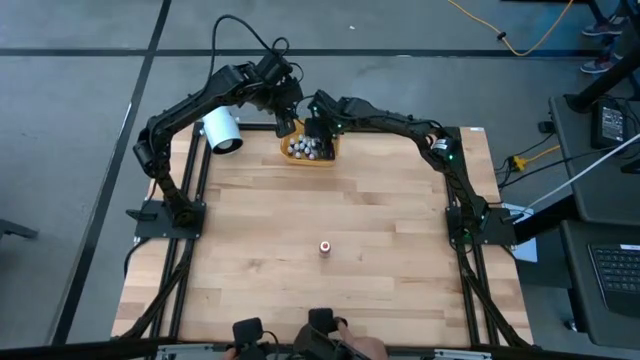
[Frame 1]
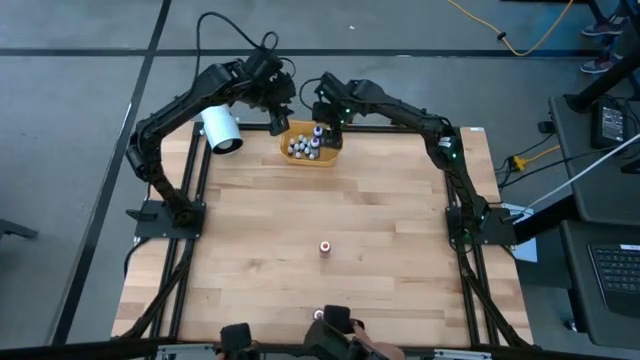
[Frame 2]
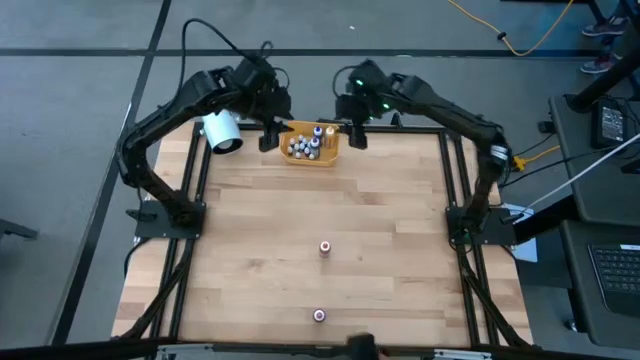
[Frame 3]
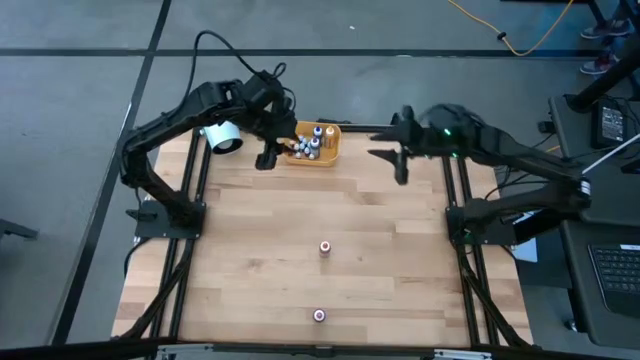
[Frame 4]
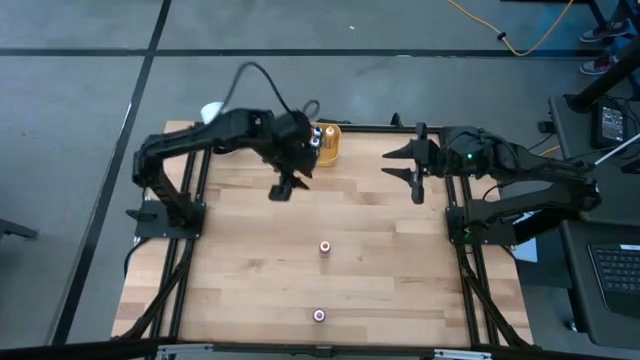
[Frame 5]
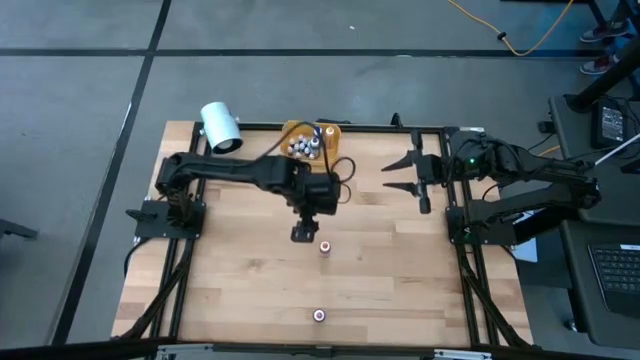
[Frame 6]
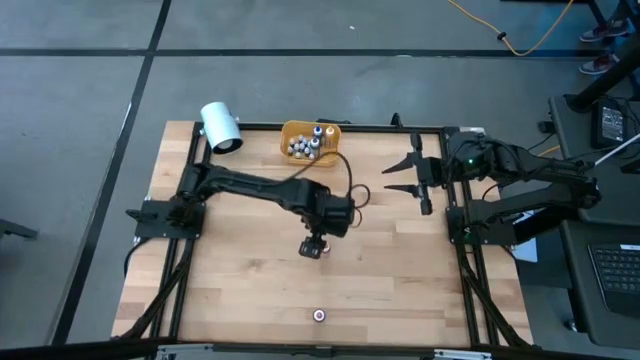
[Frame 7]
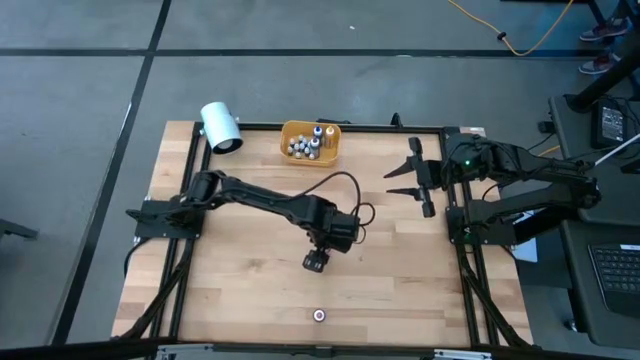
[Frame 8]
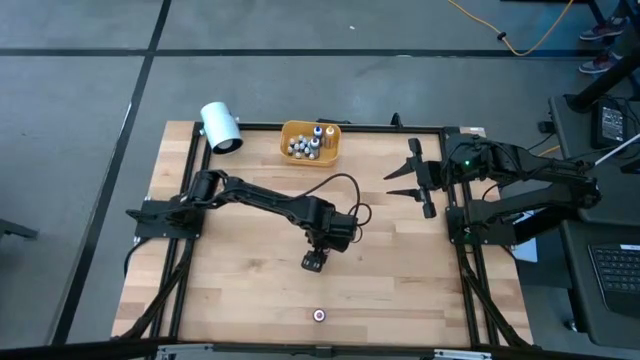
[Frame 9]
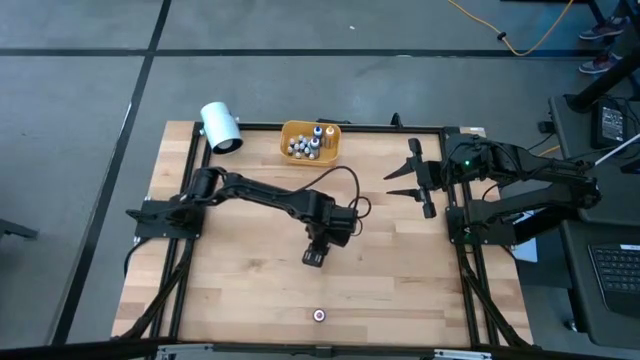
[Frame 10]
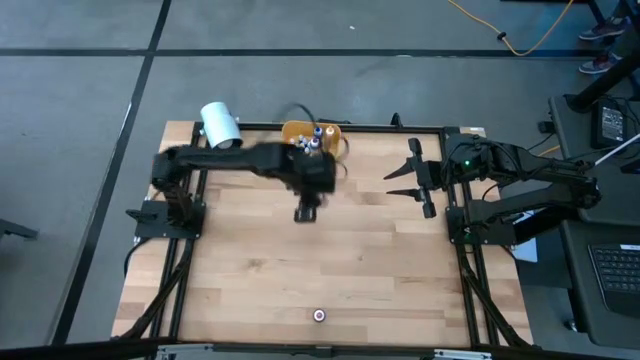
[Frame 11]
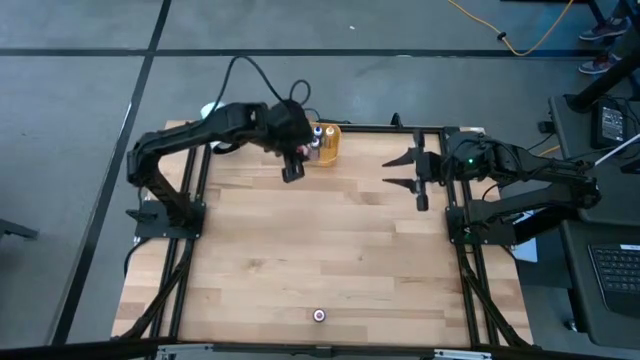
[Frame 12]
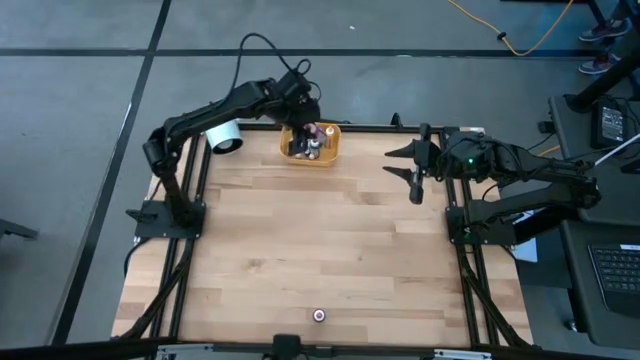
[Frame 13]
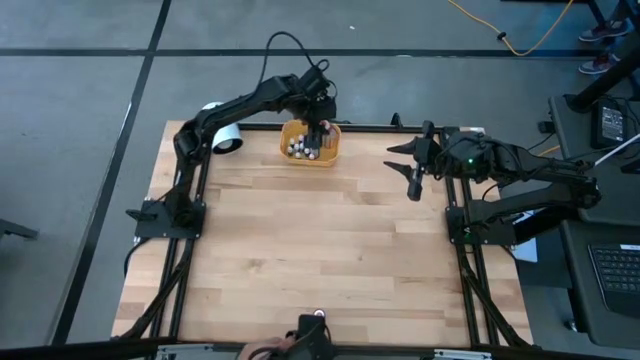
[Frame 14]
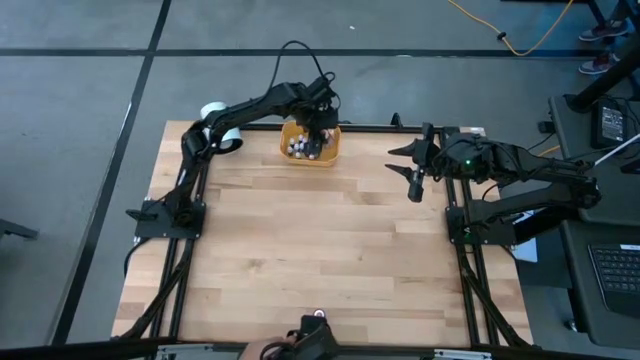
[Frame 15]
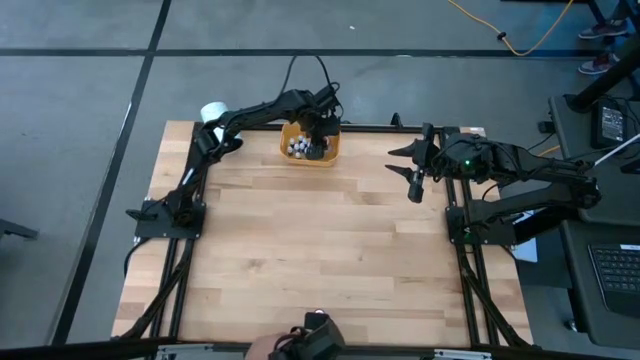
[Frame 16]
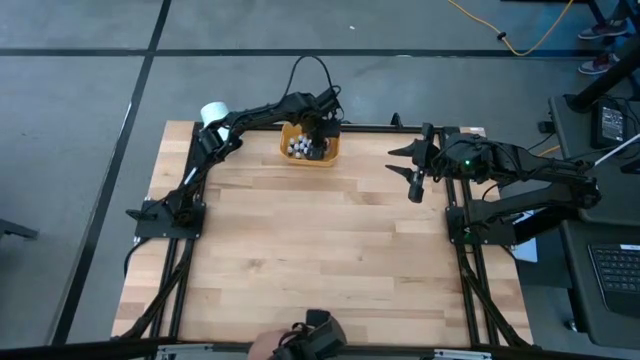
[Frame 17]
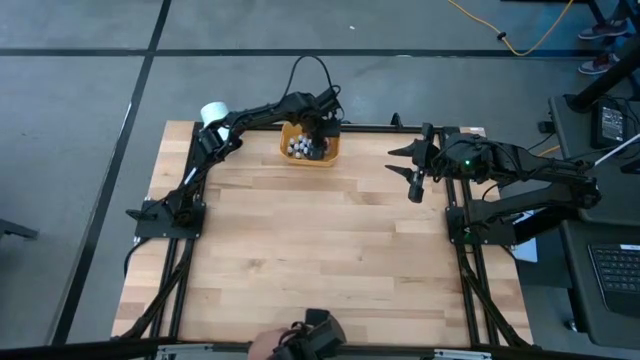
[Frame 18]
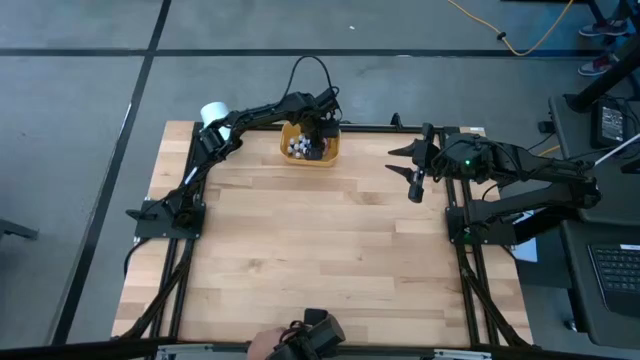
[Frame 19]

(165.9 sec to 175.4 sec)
Task: Pick & Place food coloring
Put the large orange food coloring bottle into the yellow bin

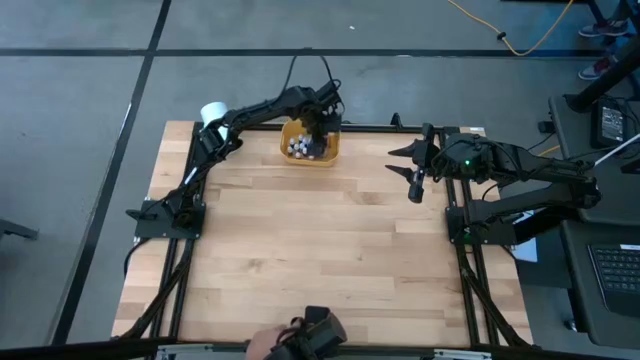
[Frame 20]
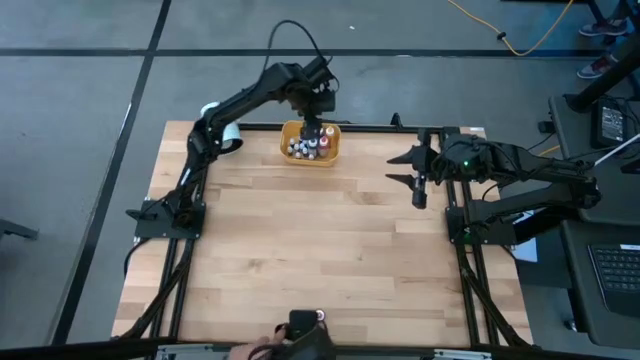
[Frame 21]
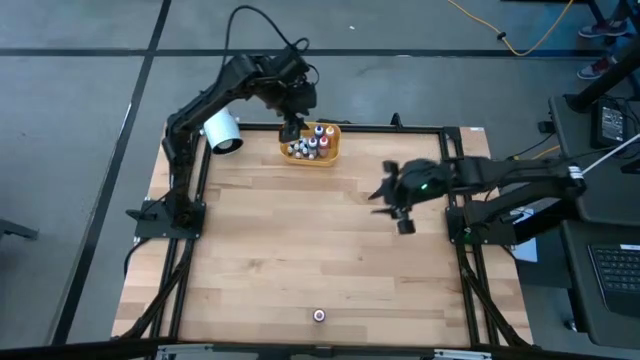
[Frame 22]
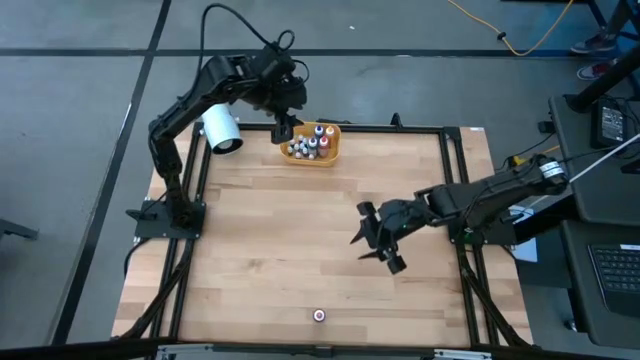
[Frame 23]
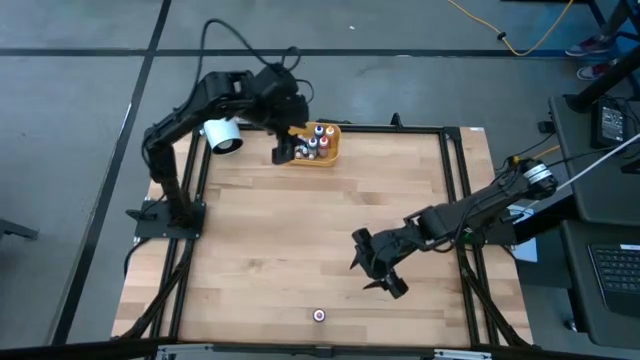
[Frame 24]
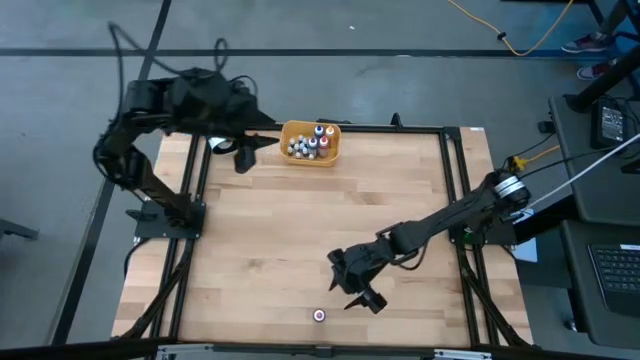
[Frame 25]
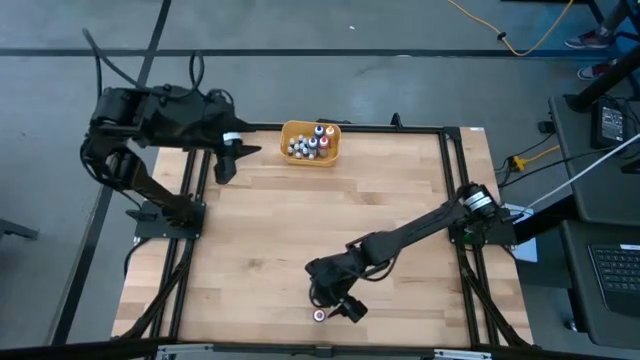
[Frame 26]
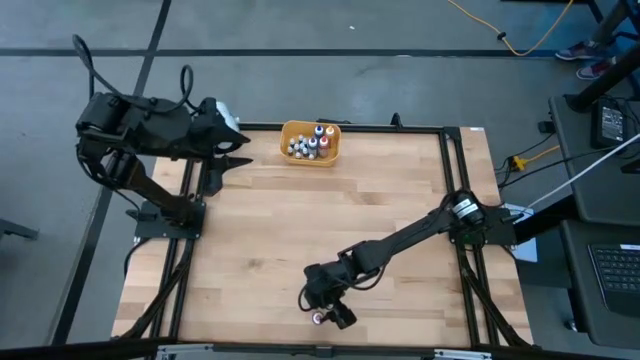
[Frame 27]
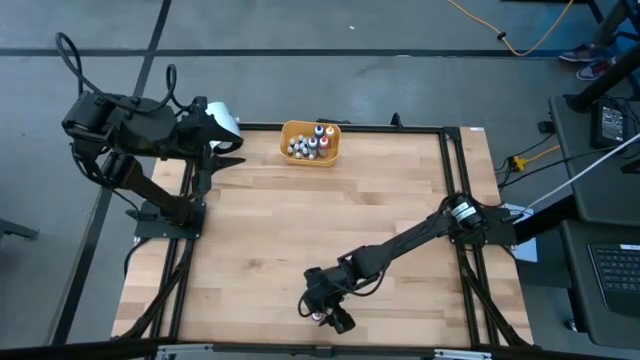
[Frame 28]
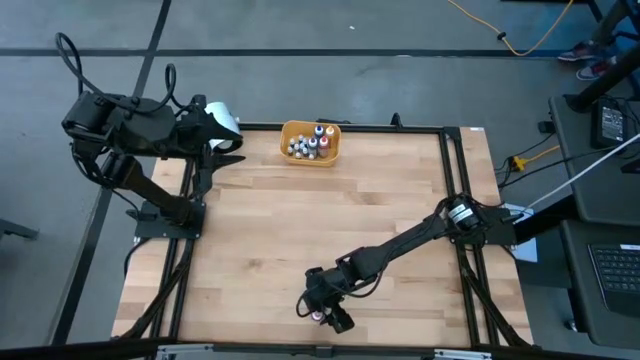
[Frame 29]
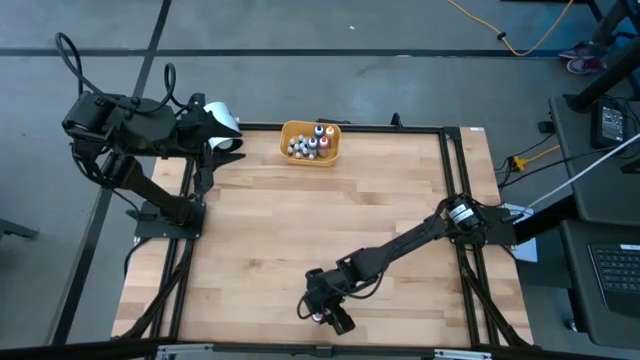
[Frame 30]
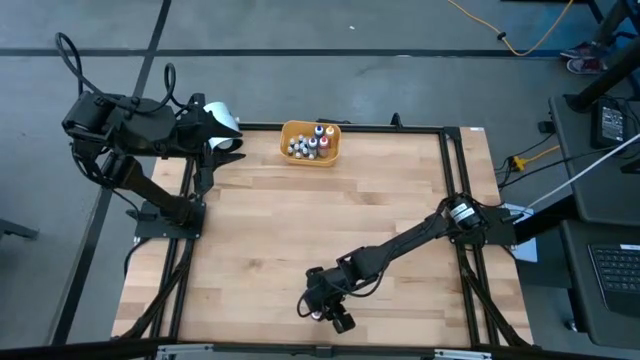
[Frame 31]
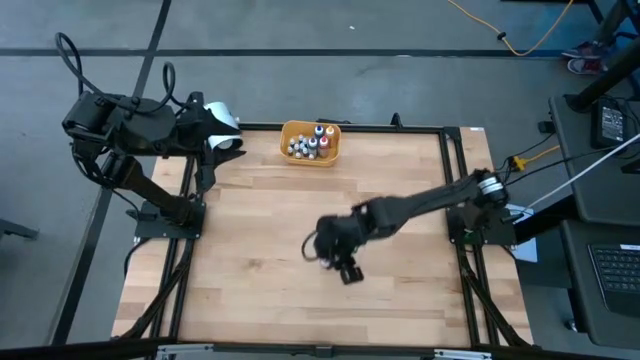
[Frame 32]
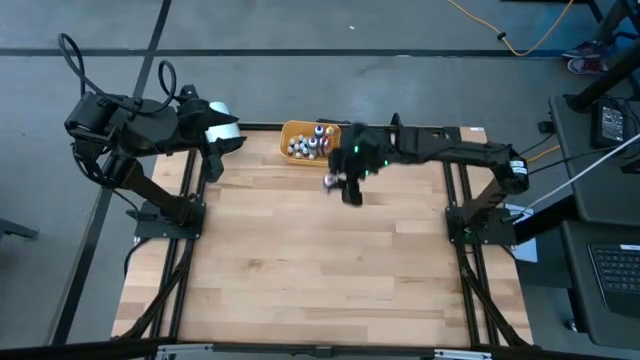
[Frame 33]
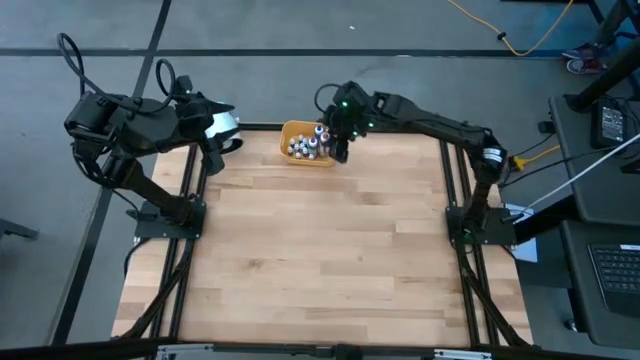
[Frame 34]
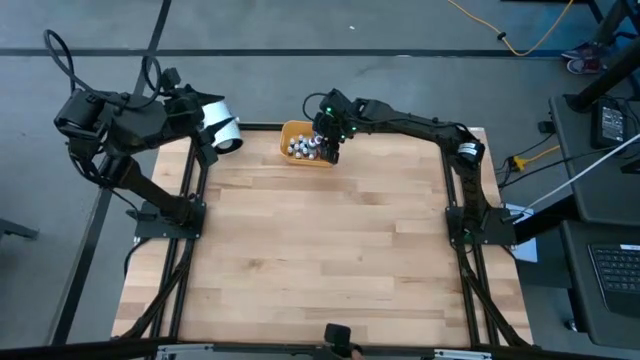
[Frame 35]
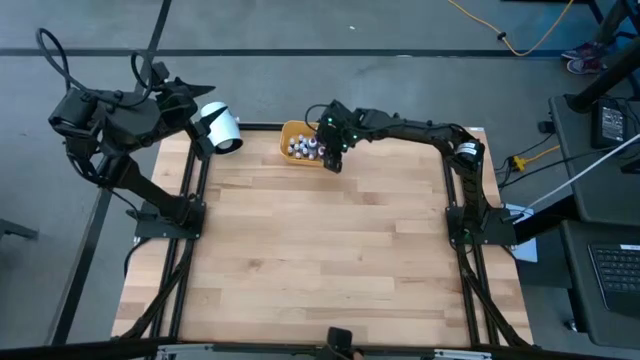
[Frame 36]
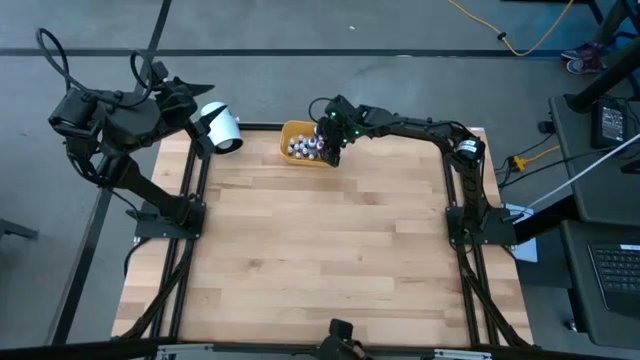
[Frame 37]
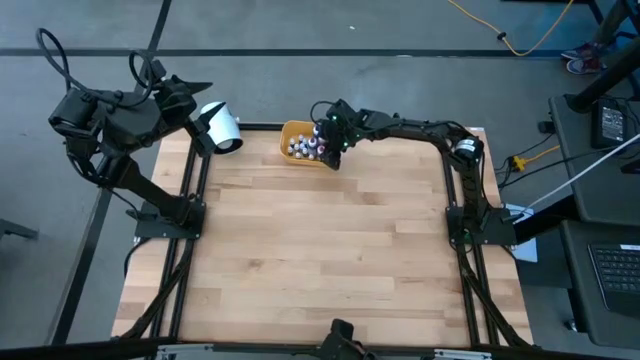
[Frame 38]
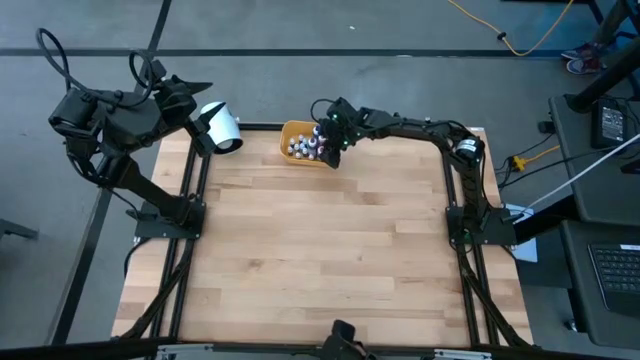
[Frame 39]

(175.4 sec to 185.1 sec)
Put the pink food coloring bottle into the yellow bin
